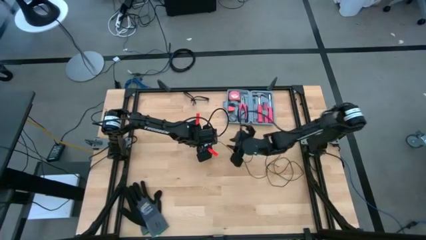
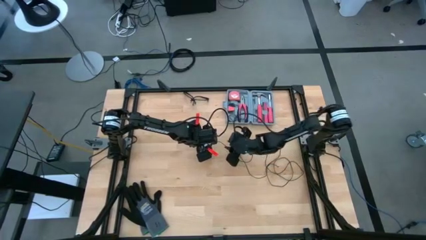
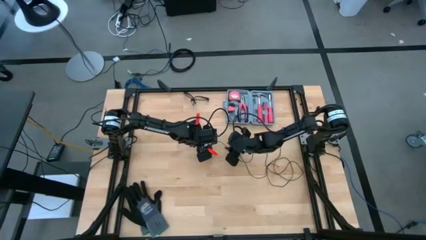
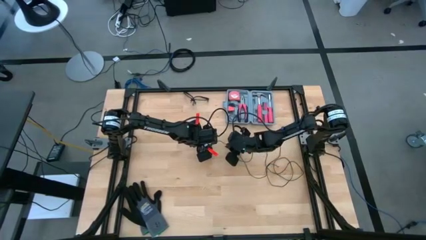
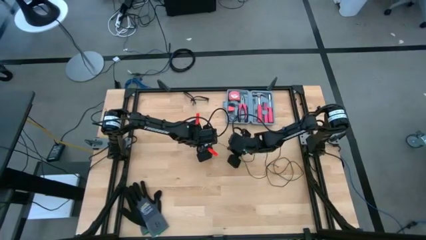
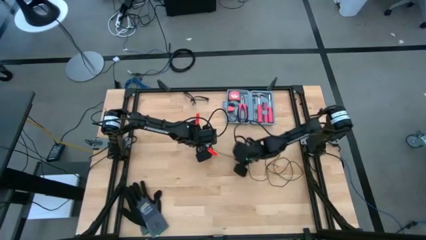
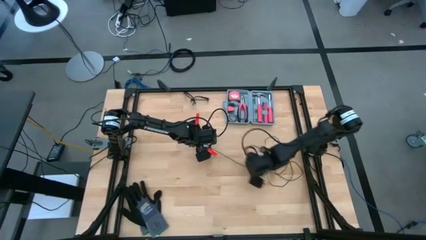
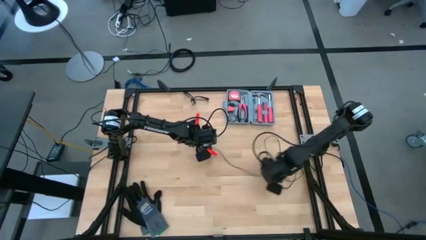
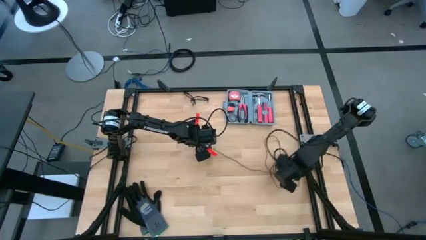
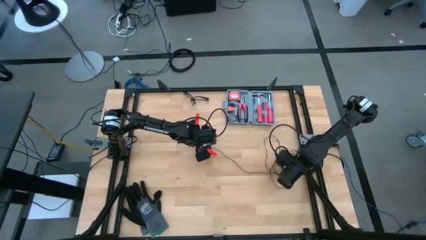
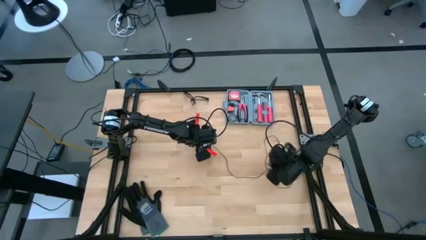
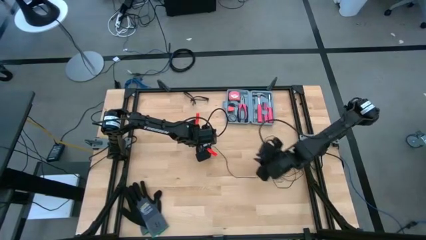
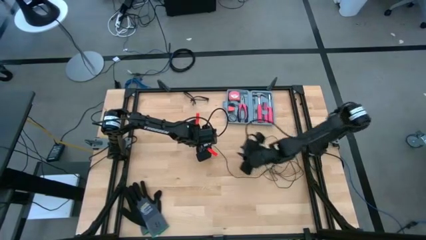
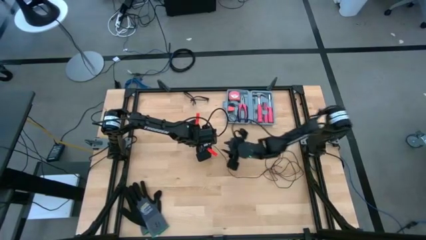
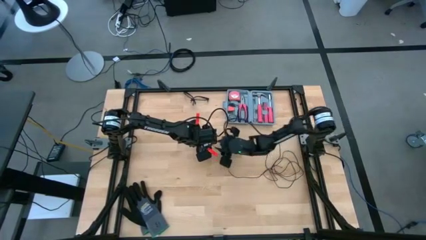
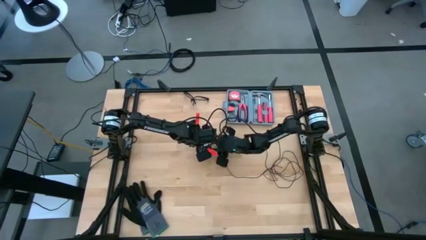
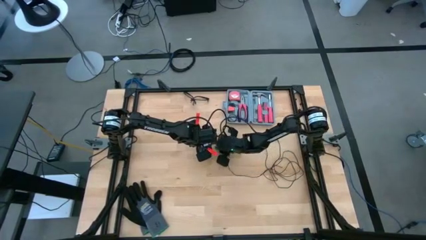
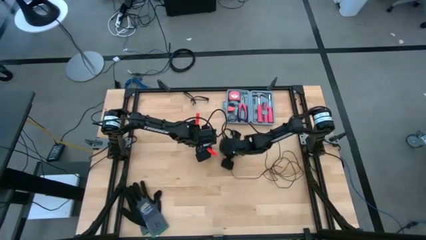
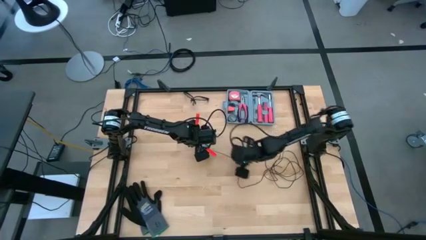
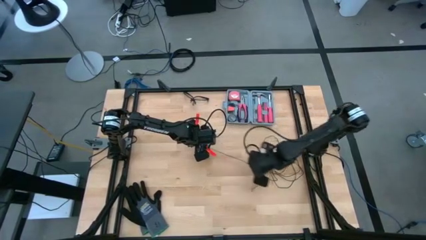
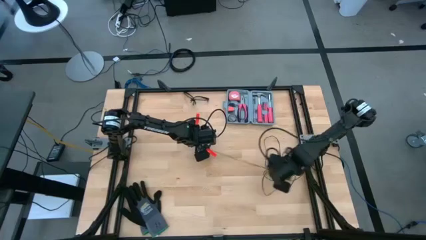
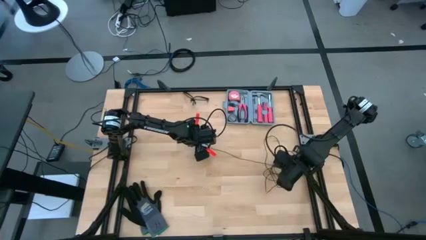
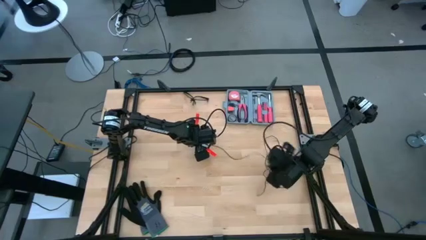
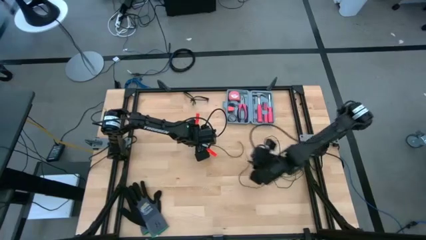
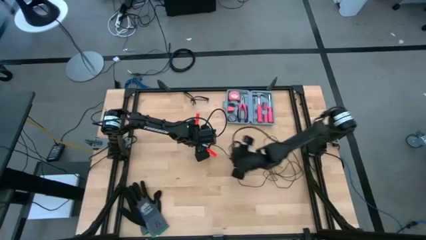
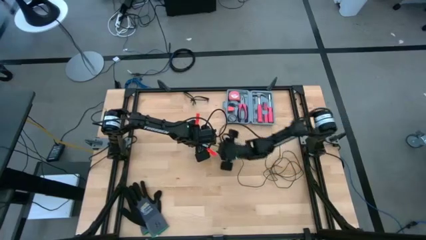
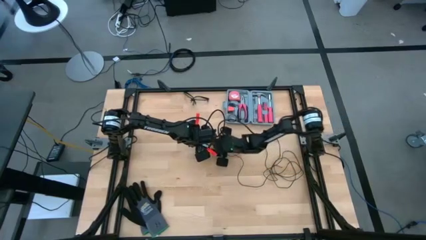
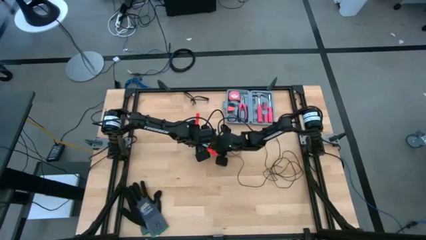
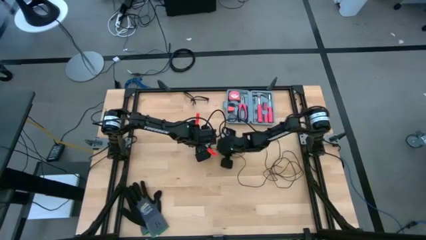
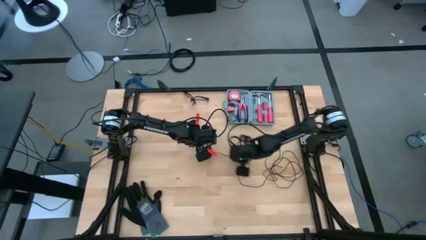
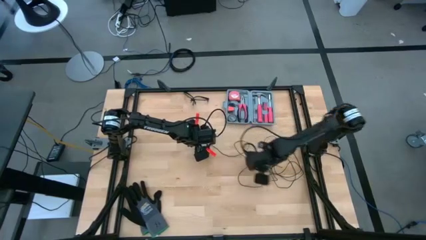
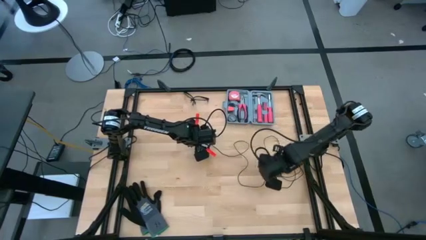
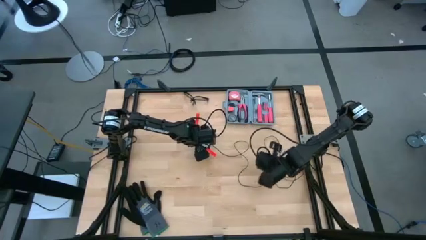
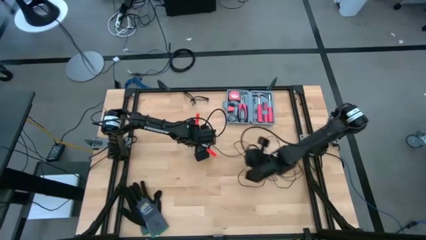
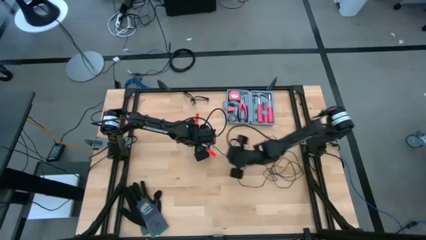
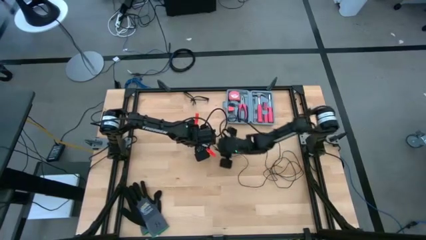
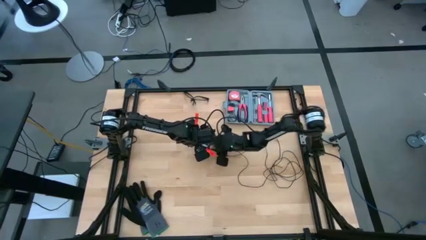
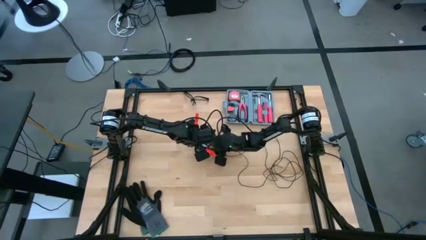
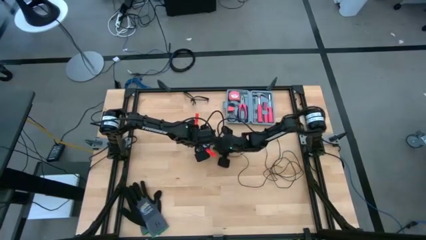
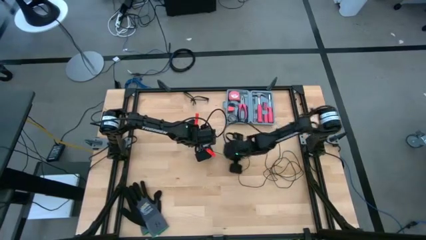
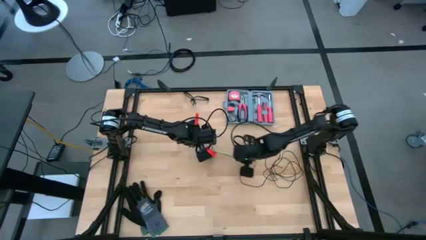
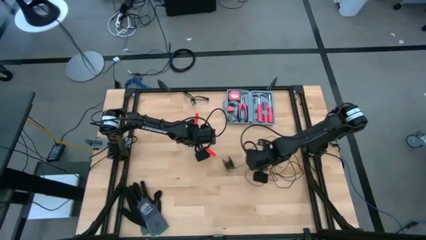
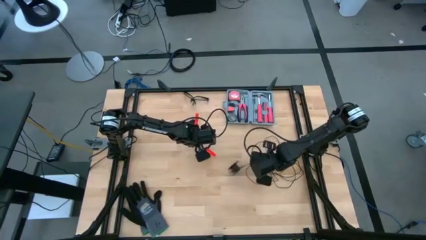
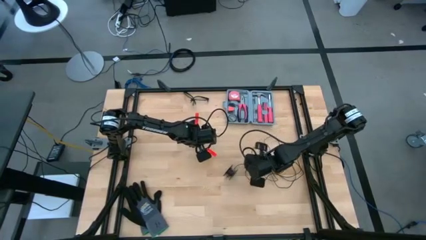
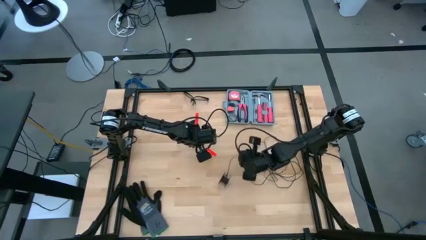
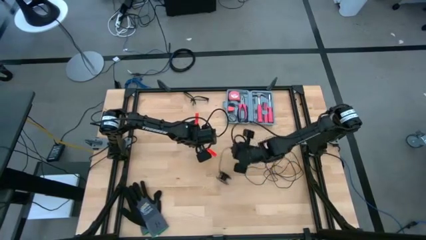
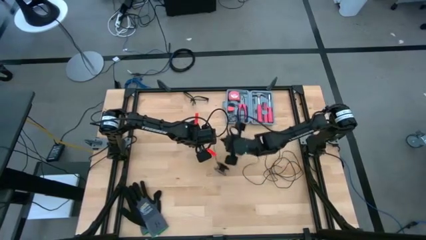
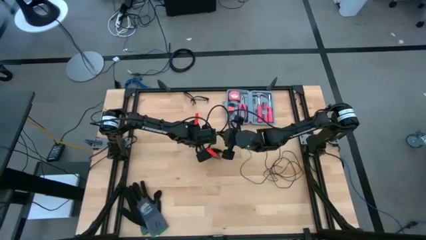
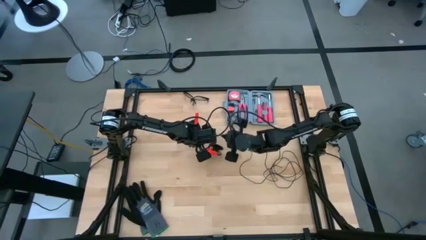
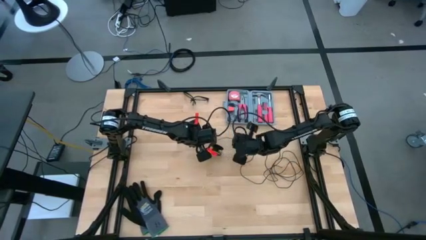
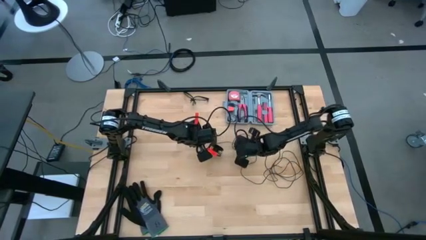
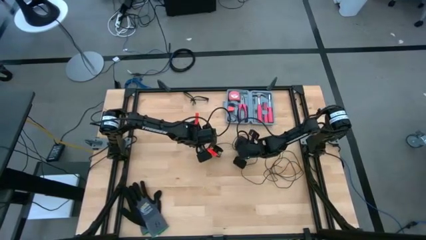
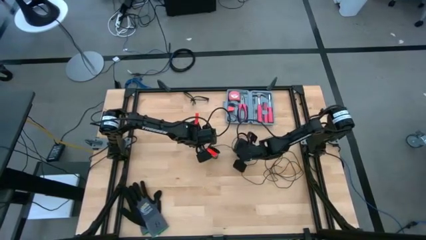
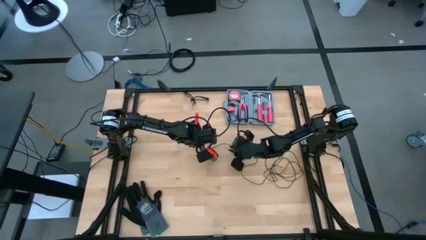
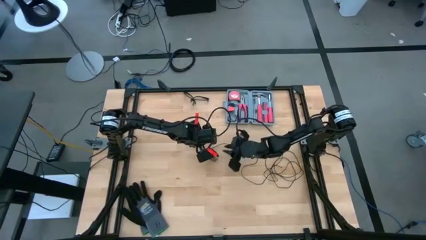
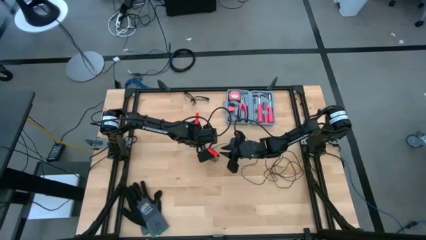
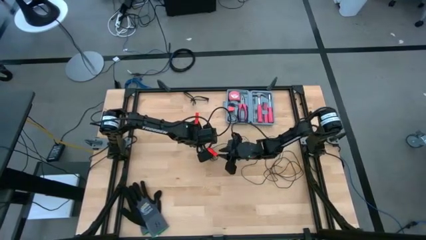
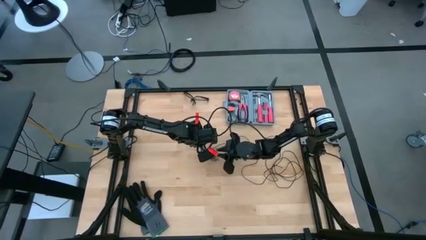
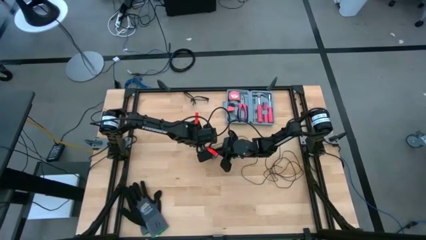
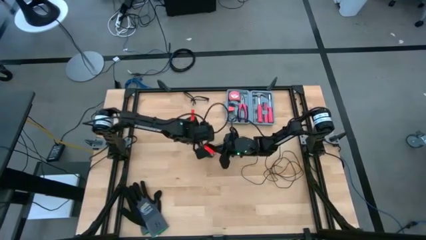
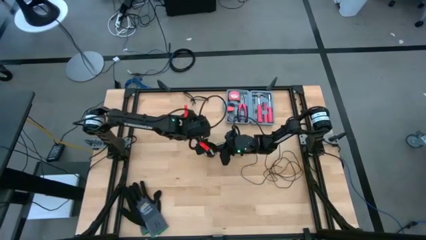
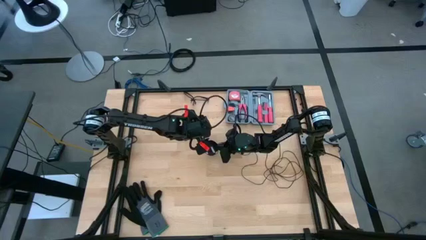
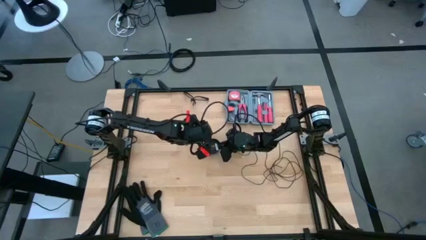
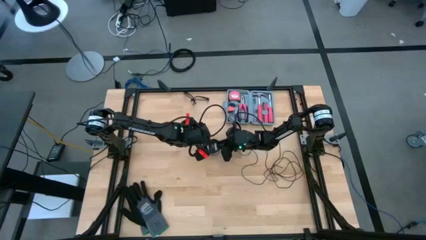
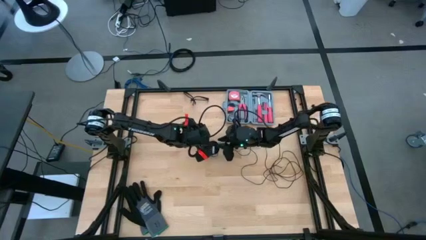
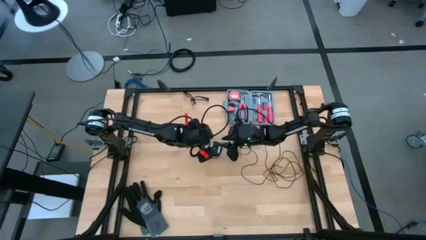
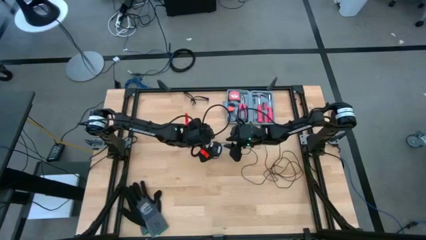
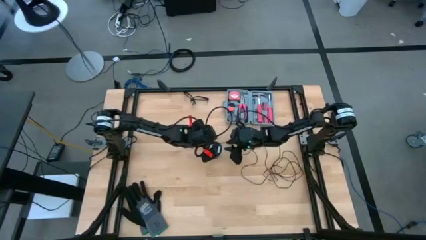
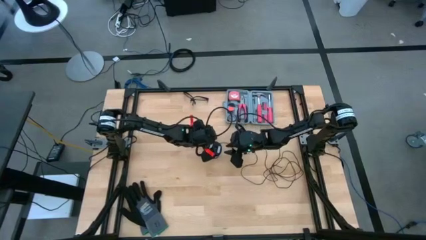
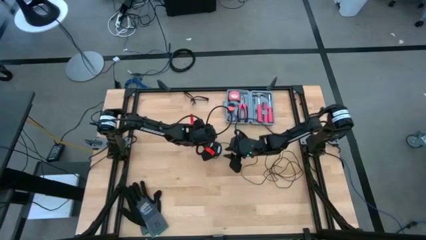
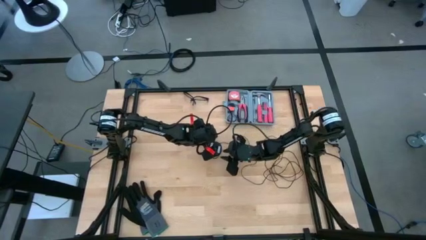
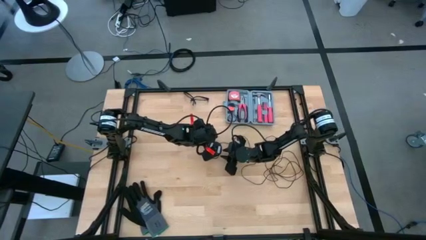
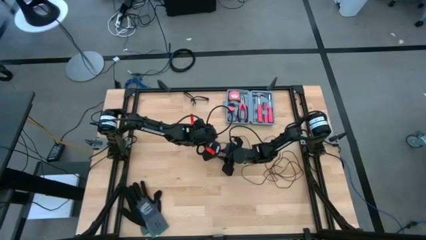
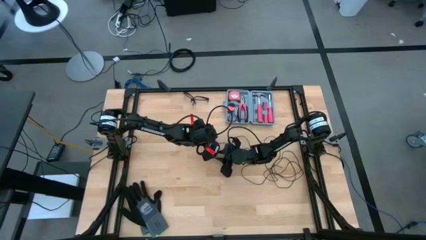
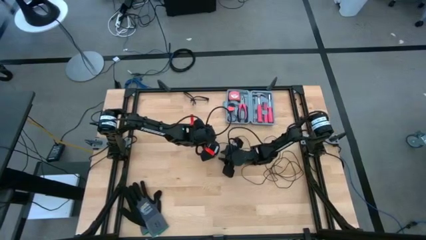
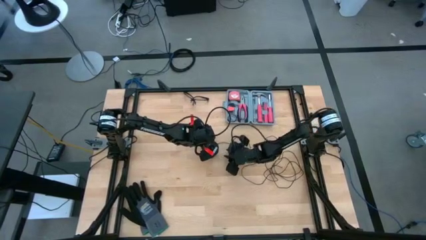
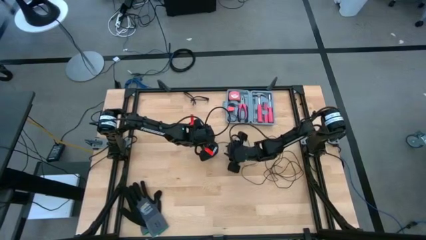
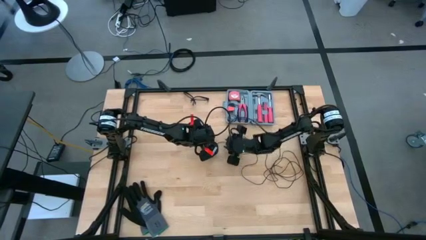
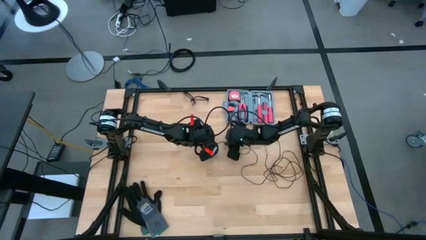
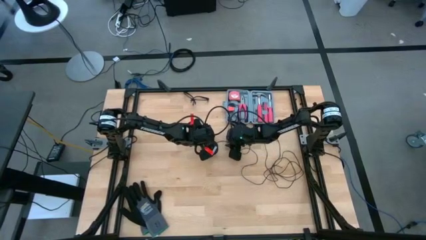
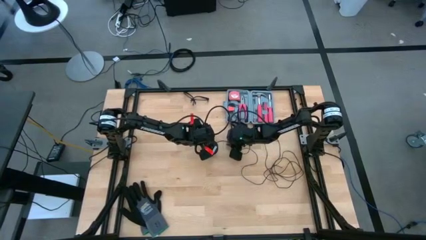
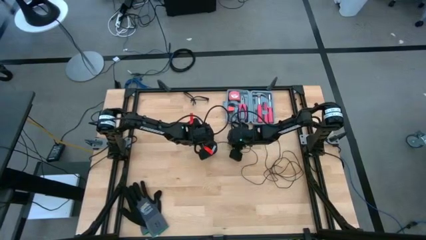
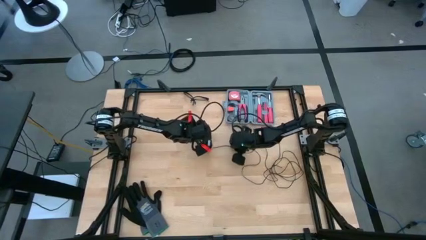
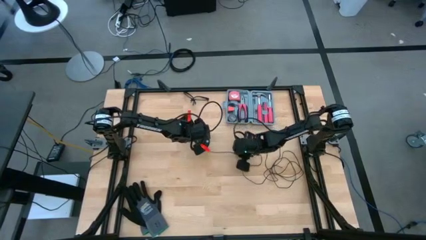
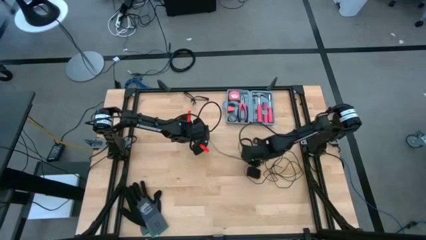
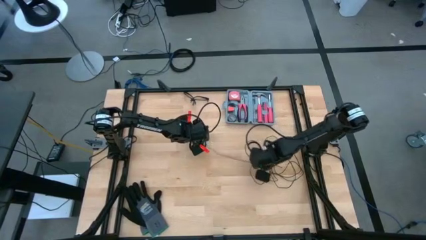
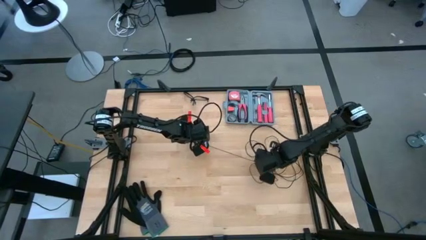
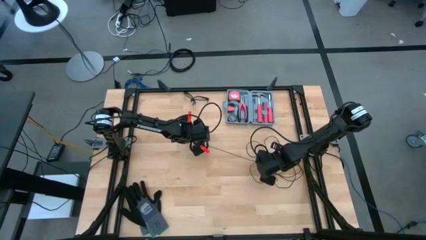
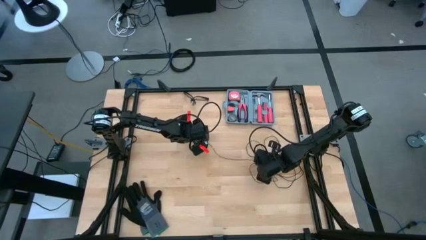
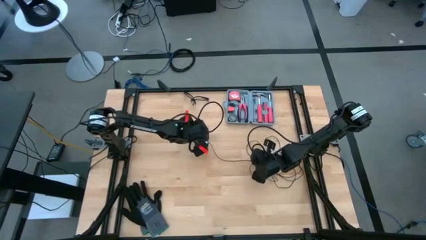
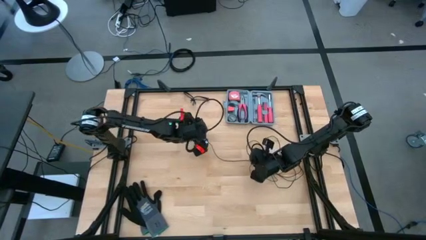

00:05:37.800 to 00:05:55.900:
Task: Coil cords
Uncoil the black wire from the spool
